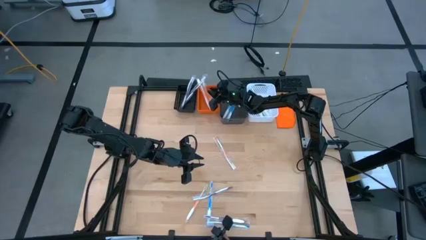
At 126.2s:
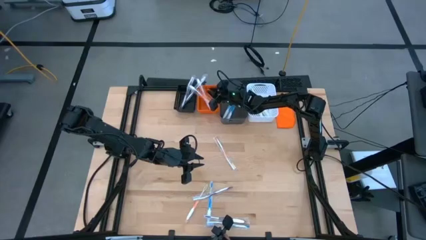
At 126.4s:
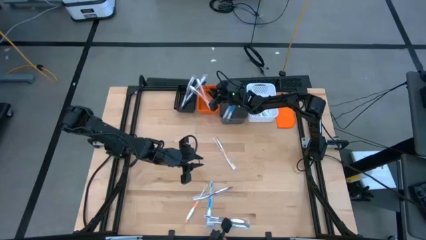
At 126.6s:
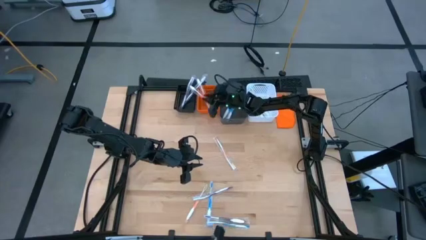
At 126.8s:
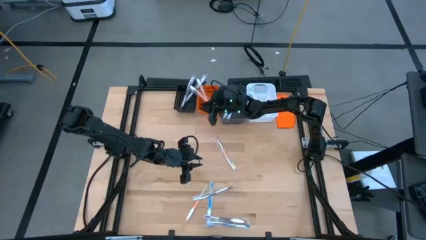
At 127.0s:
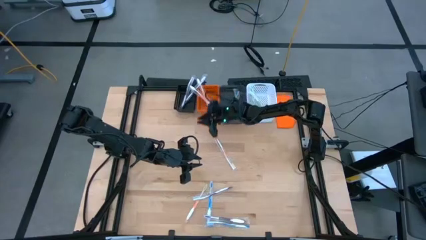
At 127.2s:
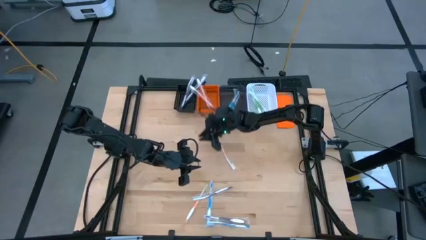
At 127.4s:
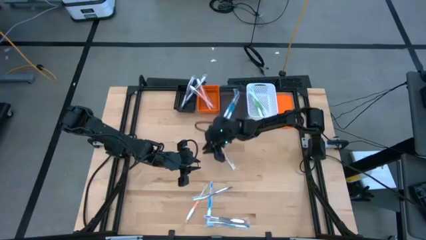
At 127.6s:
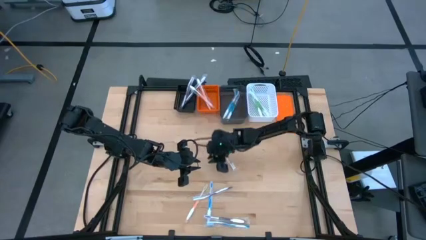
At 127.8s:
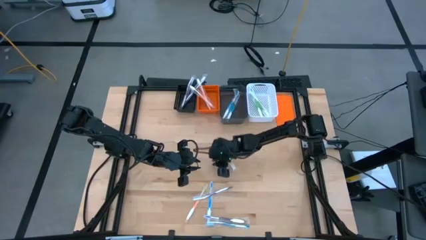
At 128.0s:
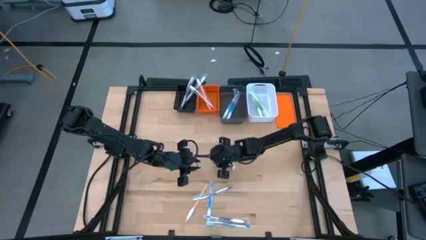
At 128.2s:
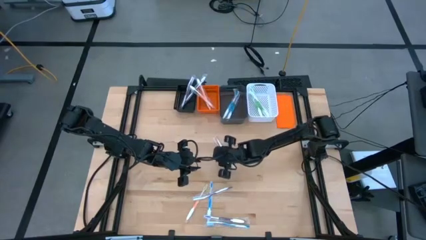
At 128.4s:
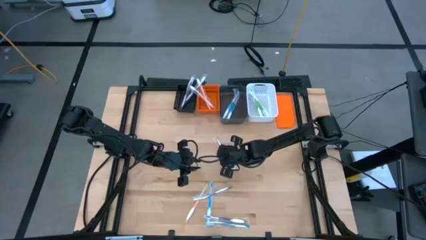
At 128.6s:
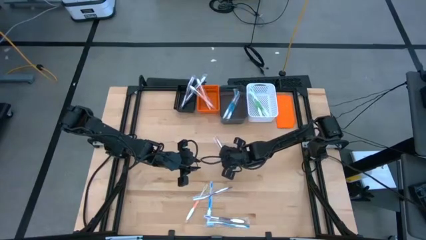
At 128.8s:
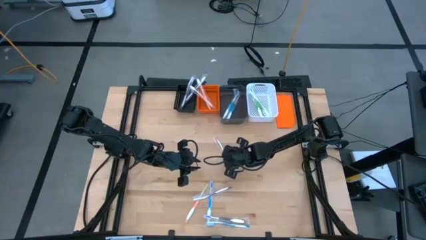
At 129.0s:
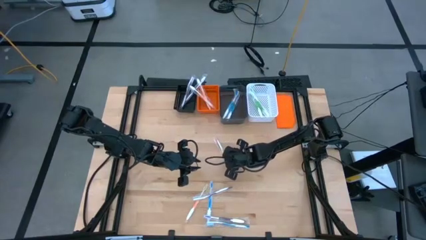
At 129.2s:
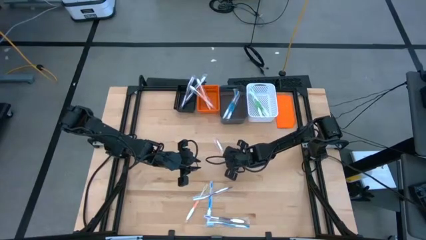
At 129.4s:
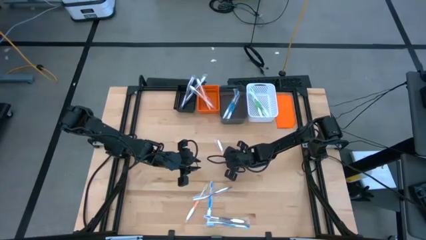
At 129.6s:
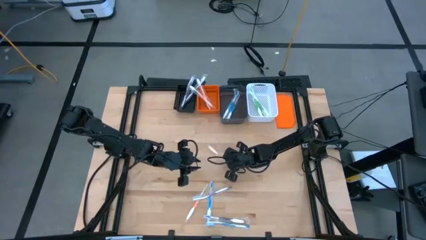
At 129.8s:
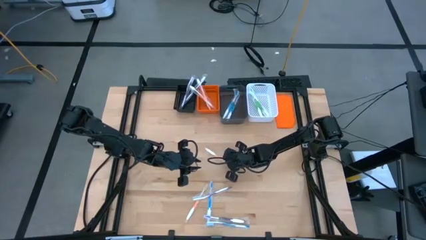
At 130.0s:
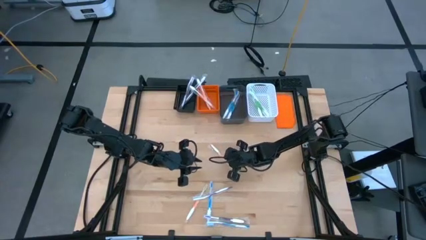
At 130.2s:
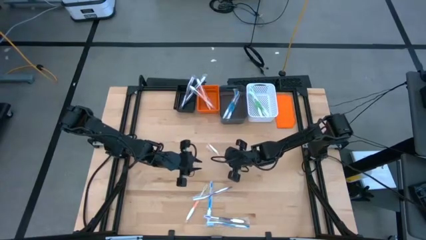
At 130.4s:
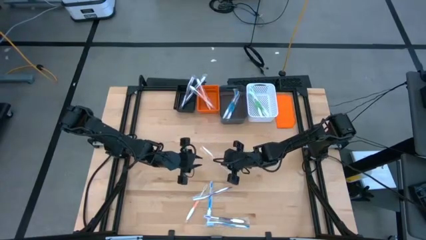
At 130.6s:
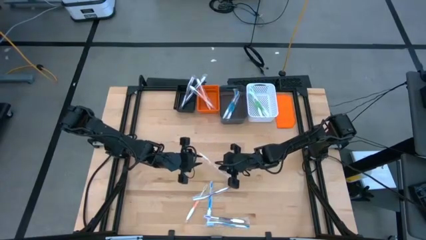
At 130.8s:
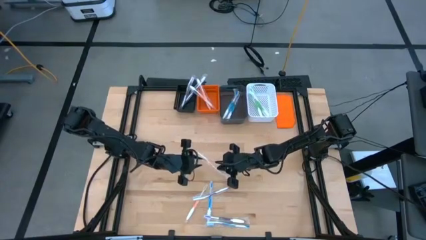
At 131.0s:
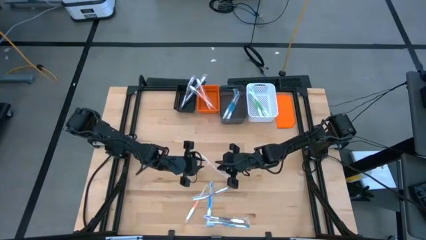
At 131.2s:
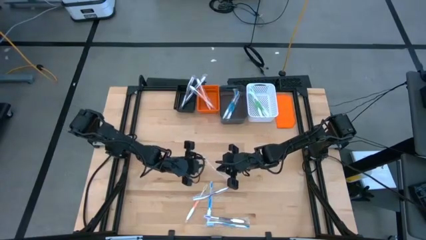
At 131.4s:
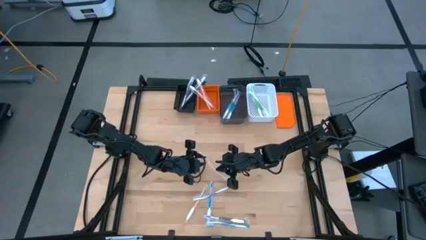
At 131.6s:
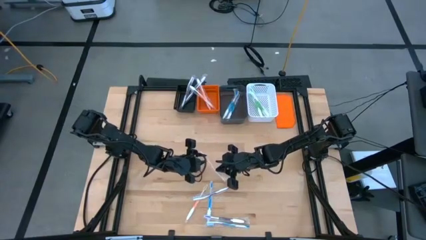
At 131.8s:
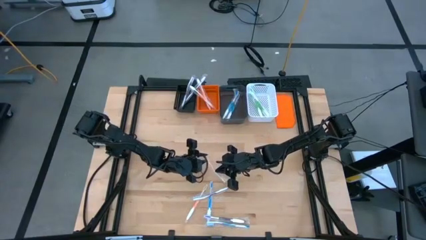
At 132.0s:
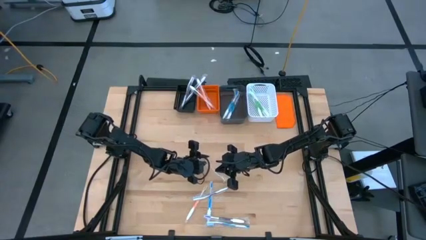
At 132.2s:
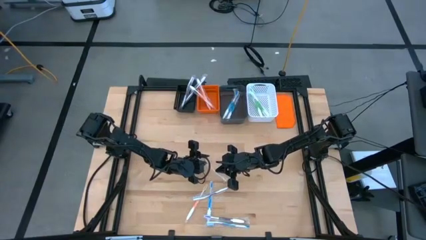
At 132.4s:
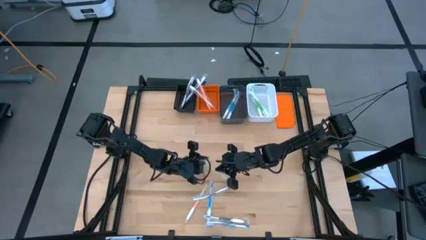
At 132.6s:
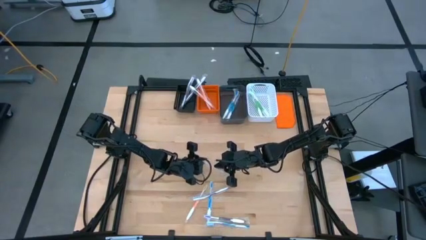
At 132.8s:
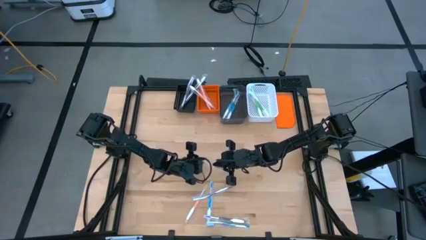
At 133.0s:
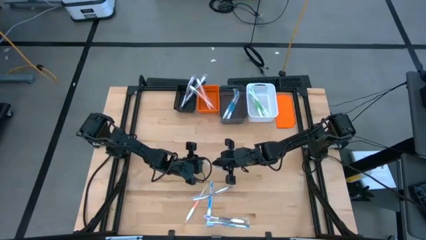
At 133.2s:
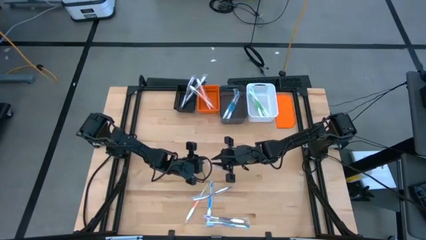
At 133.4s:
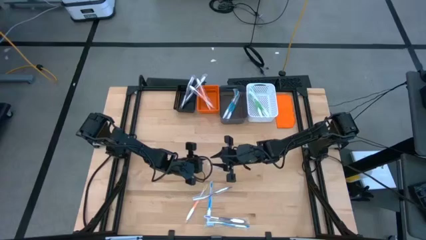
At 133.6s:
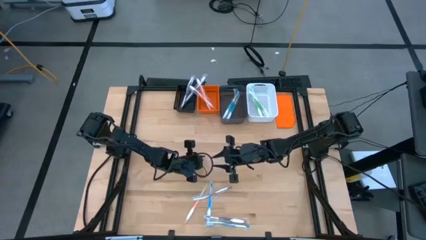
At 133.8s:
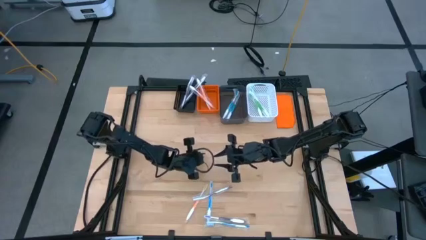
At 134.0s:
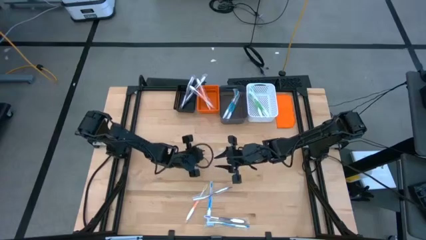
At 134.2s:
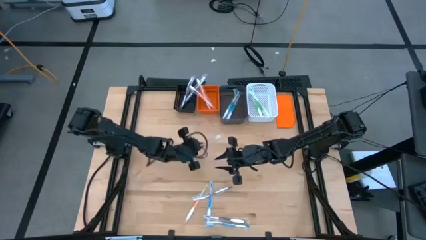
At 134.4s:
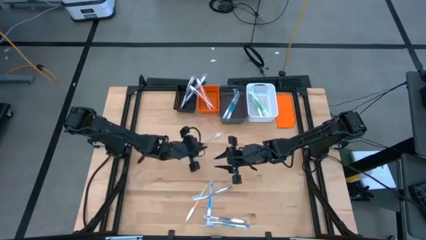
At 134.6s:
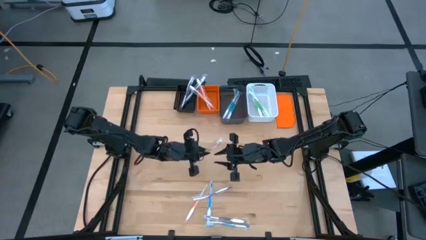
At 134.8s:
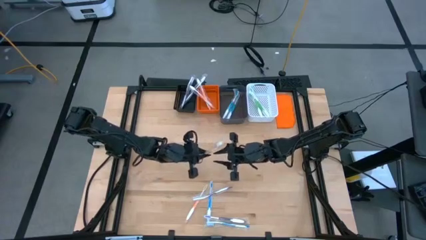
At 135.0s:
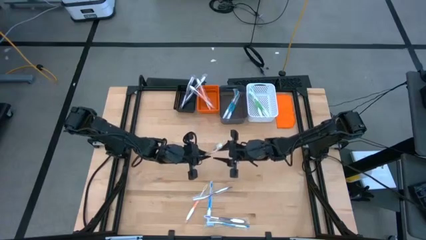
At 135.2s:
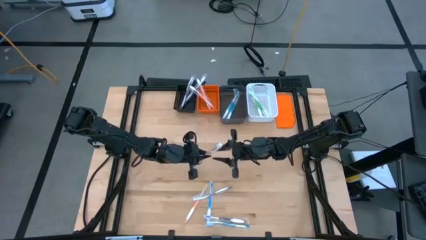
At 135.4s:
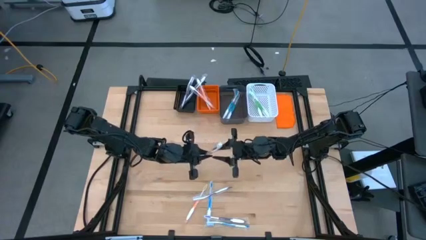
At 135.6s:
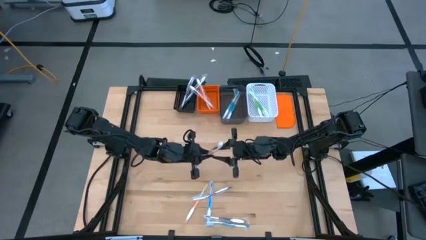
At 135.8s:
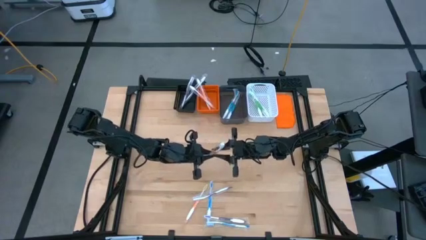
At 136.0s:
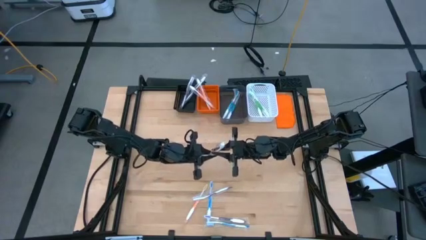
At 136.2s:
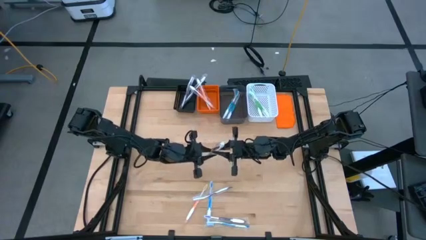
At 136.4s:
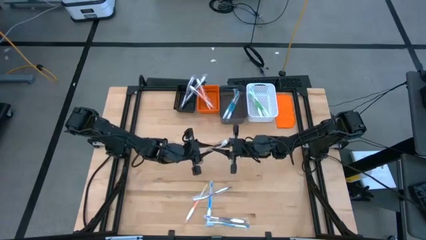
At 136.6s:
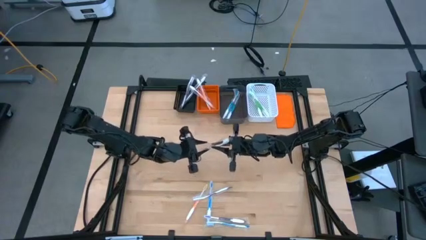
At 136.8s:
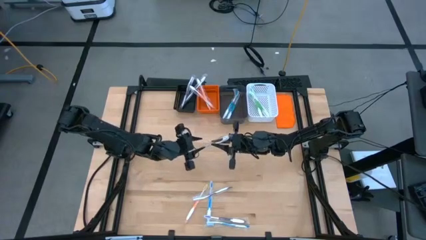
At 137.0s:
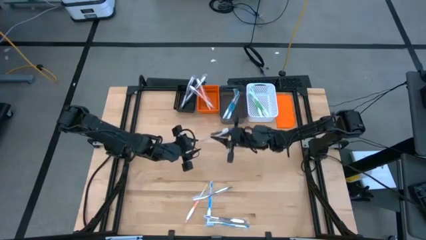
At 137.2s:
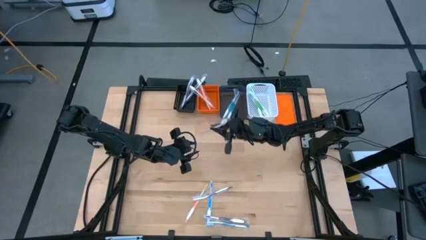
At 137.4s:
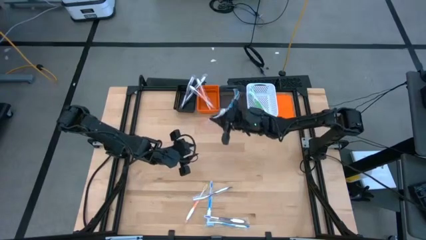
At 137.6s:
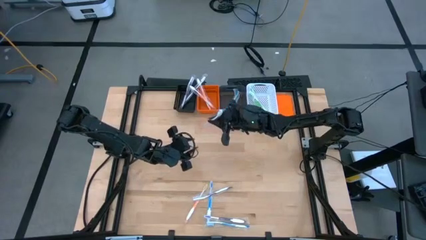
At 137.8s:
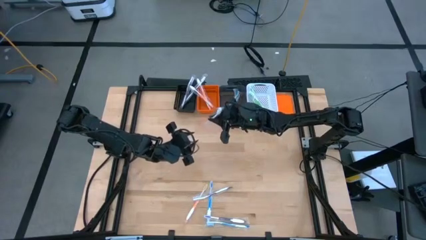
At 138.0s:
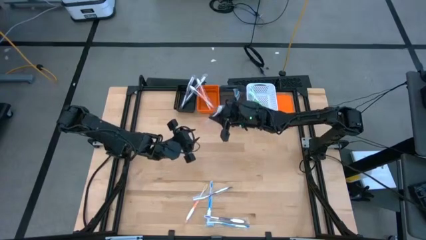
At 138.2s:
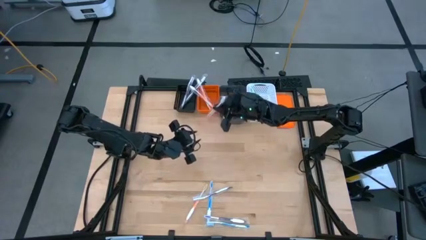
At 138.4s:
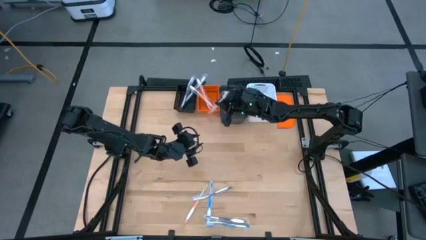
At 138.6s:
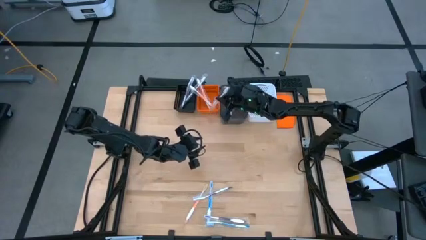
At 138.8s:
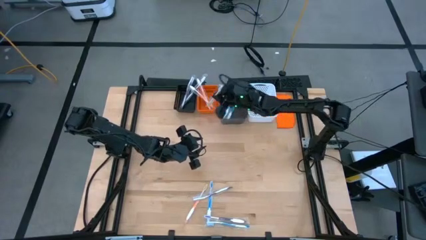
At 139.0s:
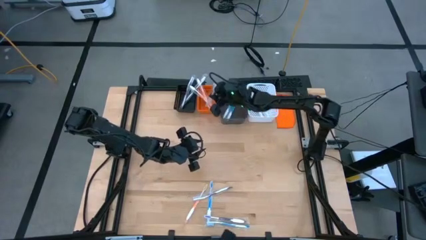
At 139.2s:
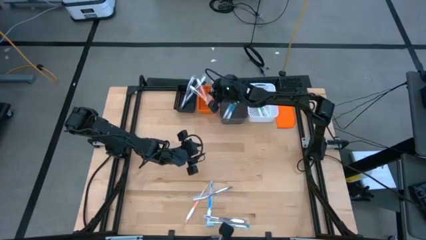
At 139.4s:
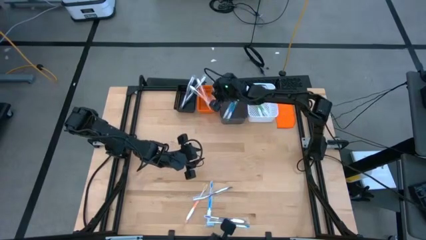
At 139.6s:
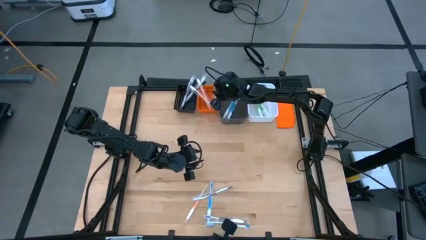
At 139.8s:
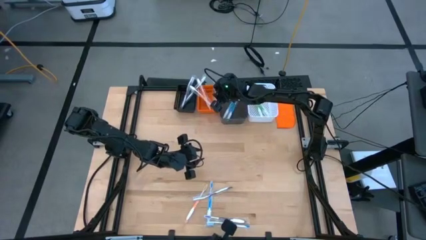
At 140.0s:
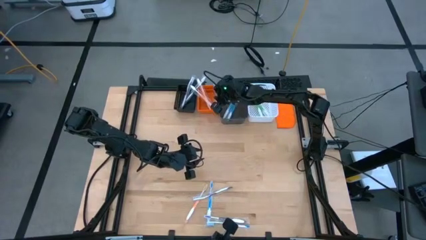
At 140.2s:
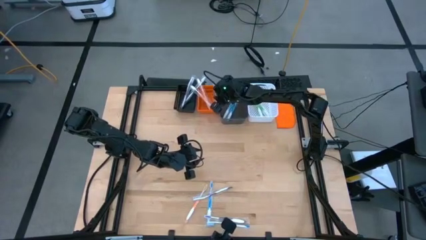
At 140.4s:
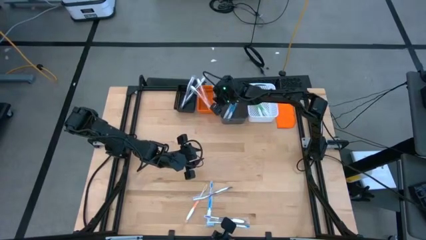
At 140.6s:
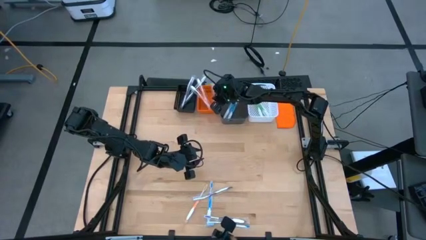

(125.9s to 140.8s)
Task: Pick & Place Toothbrushes
Put the orange toothbrush into the orange basket

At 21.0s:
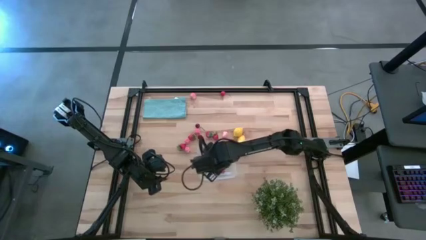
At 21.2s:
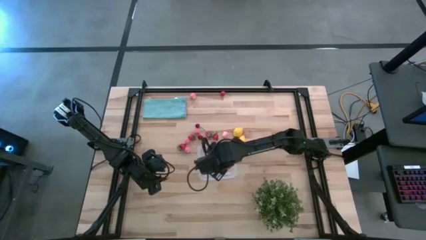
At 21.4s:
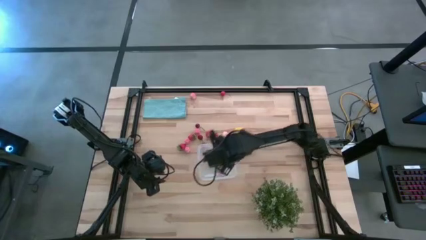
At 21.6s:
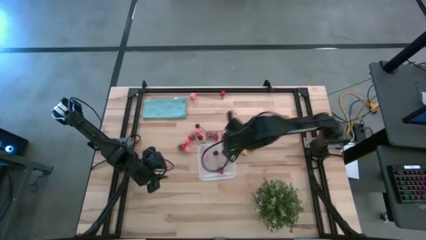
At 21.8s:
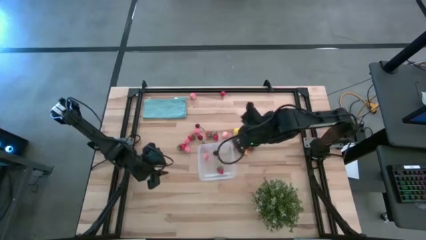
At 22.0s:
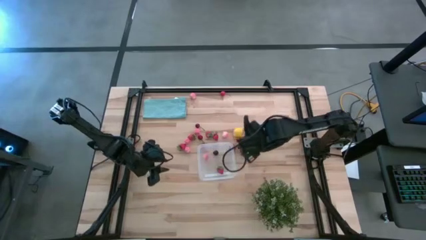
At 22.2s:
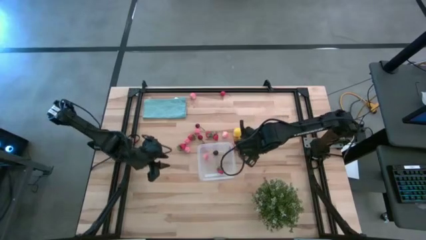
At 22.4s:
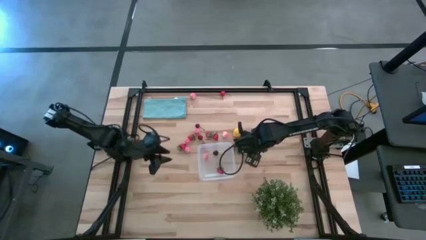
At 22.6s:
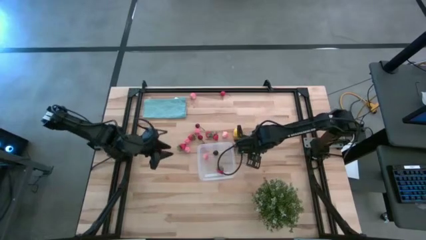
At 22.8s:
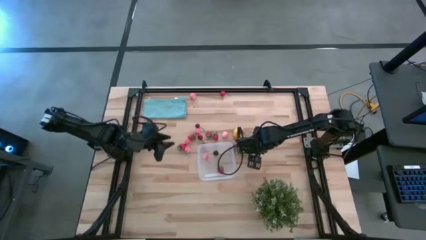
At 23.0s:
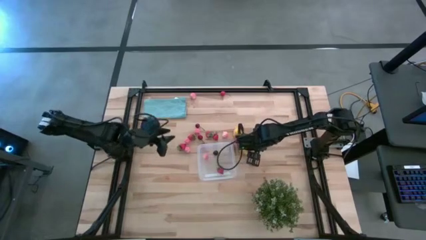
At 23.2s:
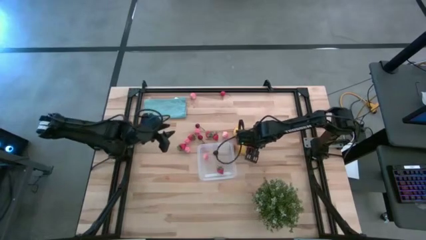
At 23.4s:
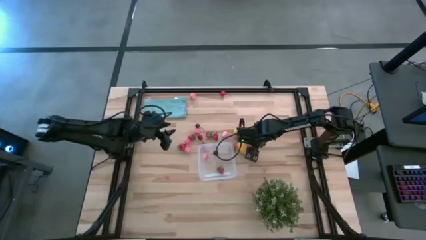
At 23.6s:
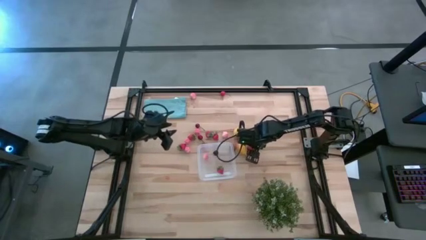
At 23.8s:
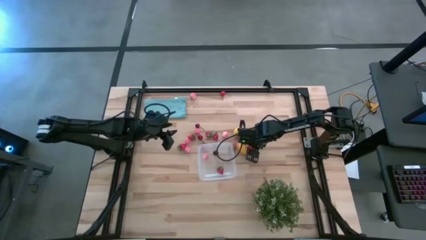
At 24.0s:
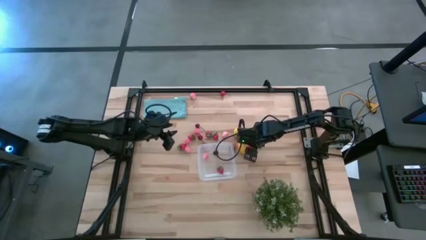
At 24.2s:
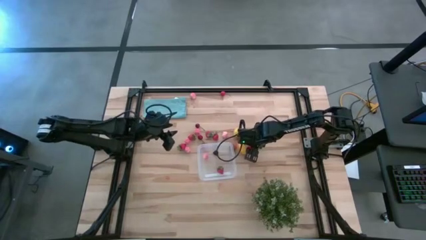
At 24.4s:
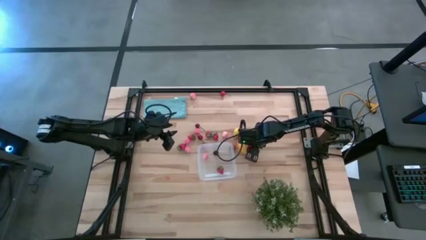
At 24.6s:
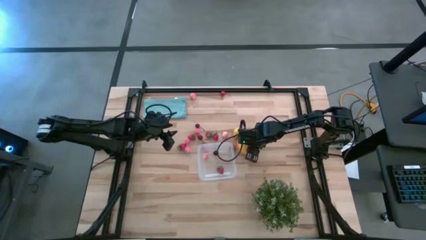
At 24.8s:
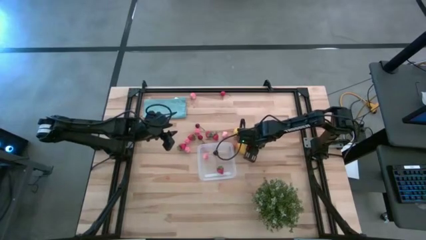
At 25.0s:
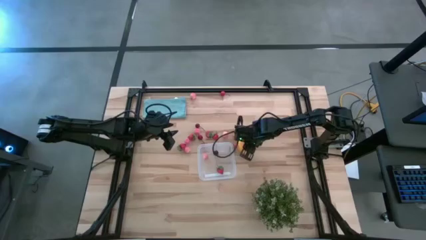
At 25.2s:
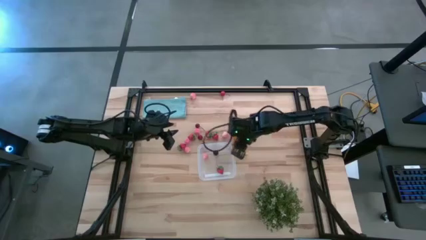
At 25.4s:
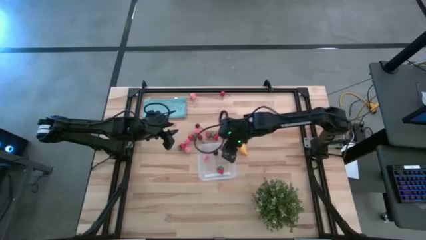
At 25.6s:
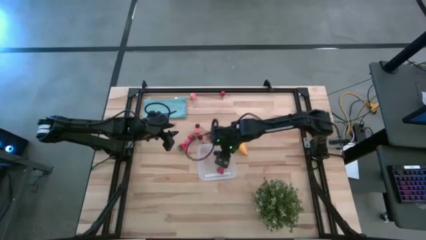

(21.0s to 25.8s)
Task: Pick and placing Produce into tupperware
Put the red strawberry into the transparent bin
